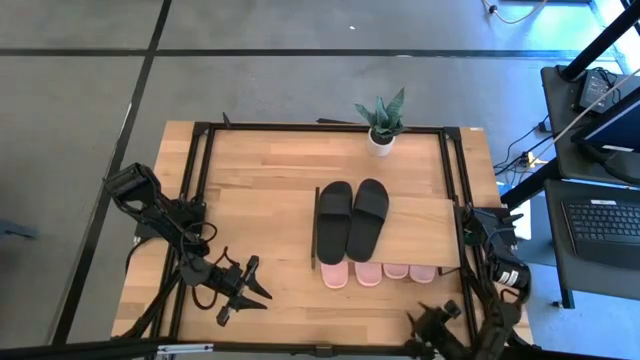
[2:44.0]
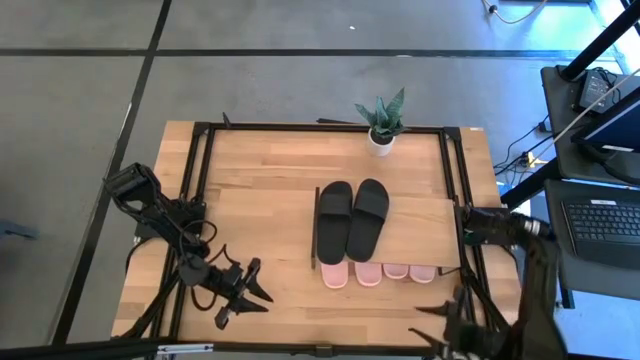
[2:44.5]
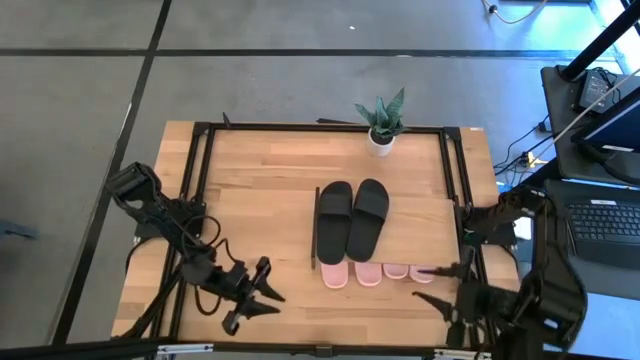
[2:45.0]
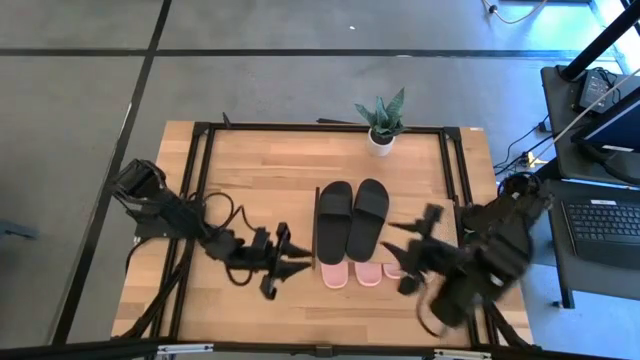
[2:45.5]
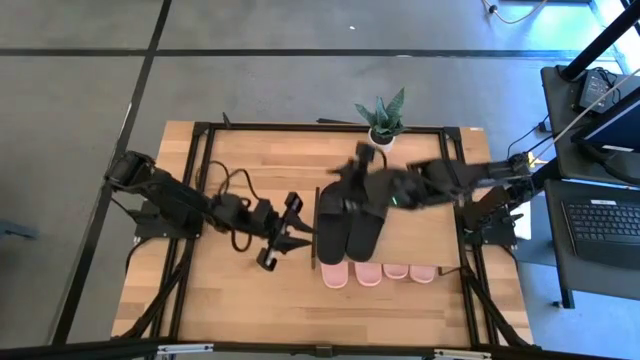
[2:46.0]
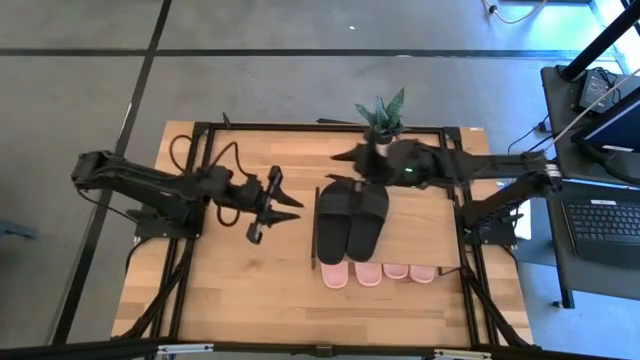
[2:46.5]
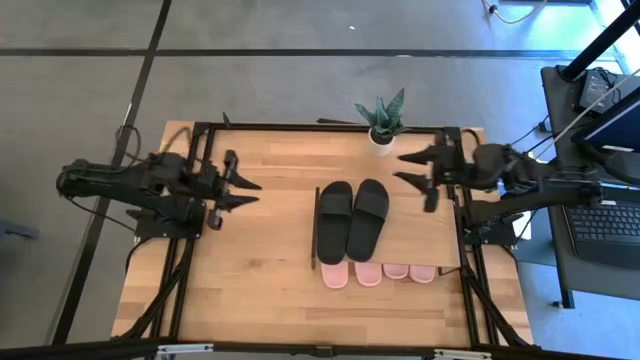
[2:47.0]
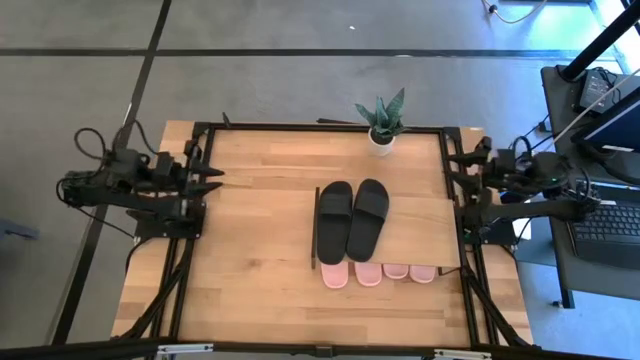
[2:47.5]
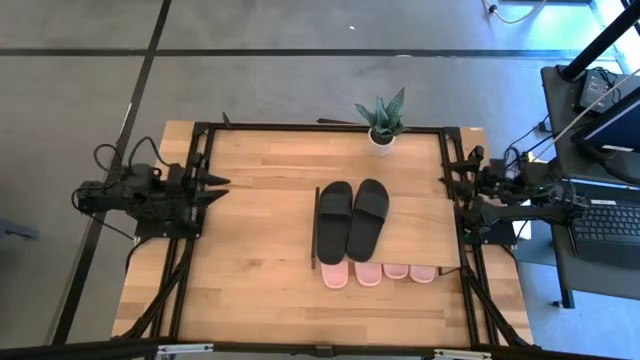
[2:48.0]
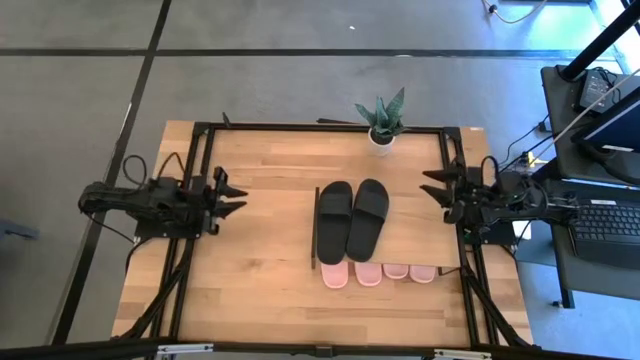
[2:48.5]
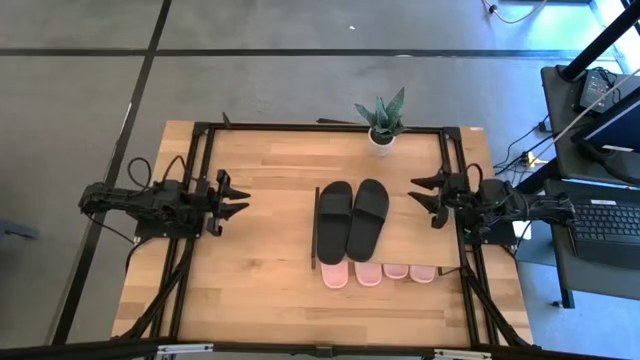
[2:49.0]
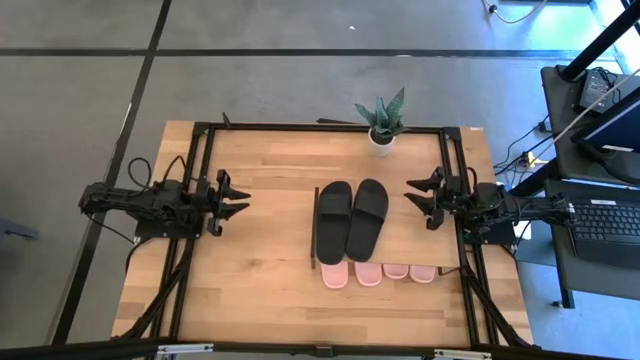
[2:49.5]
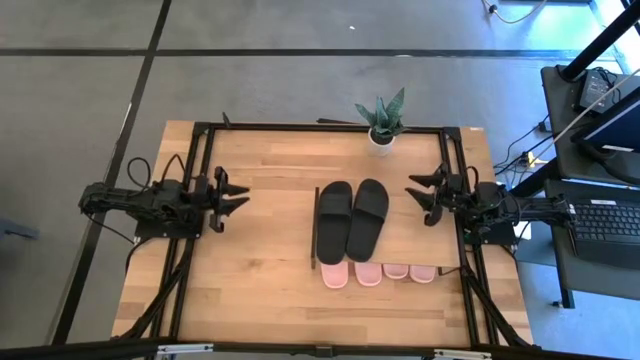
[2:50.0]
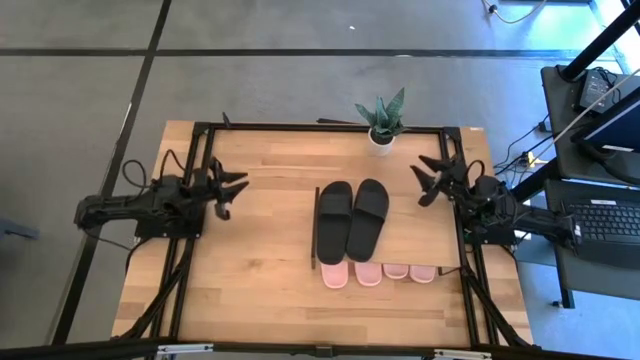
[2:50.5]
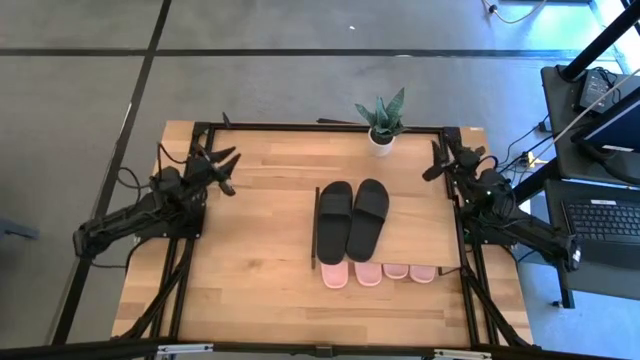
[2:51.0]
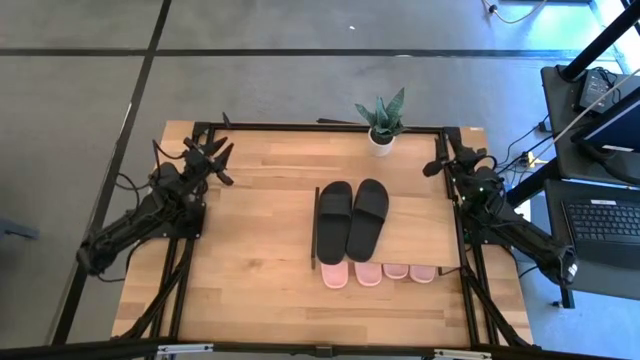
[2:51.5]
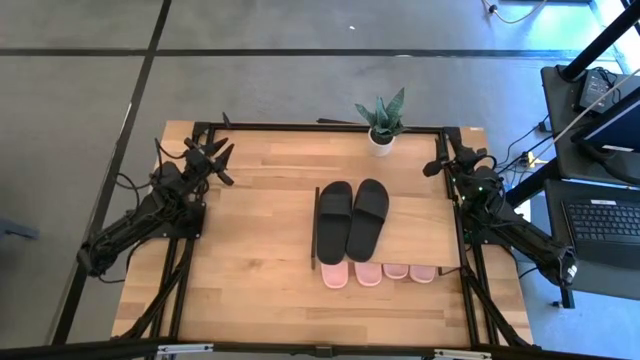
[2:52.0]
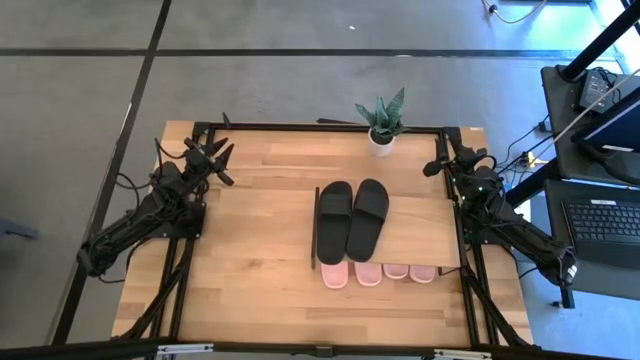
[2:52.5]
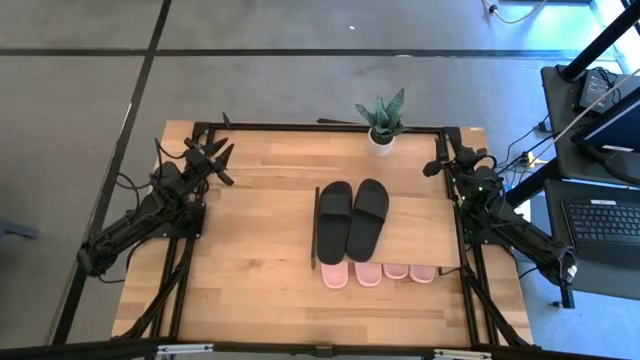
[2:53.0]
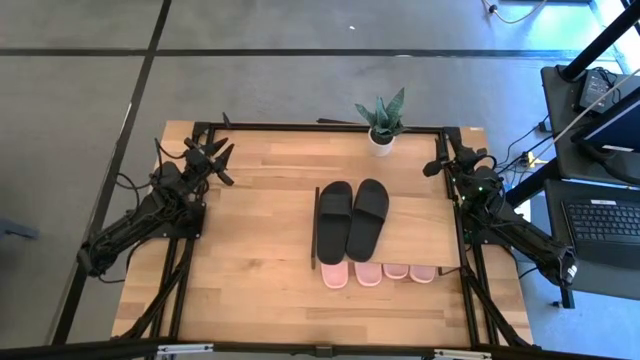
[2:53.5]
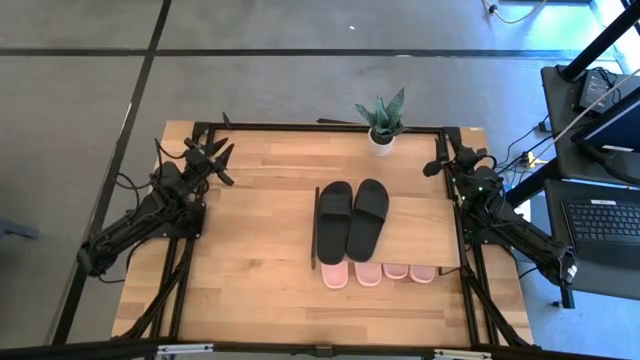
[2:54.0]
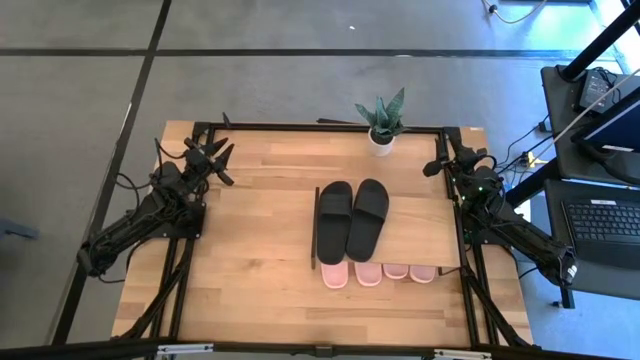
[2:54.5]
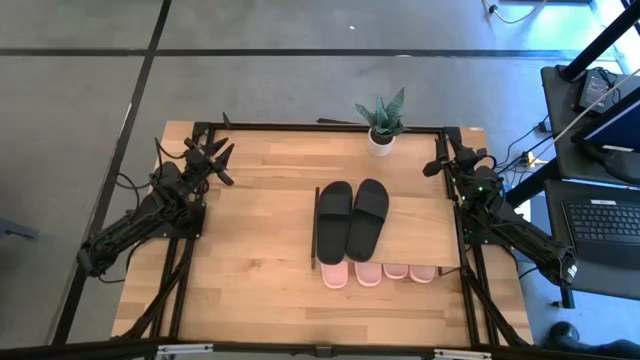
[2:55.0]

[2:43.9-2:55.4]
Task: Pick and place slides into the shelf
Return to Home Position

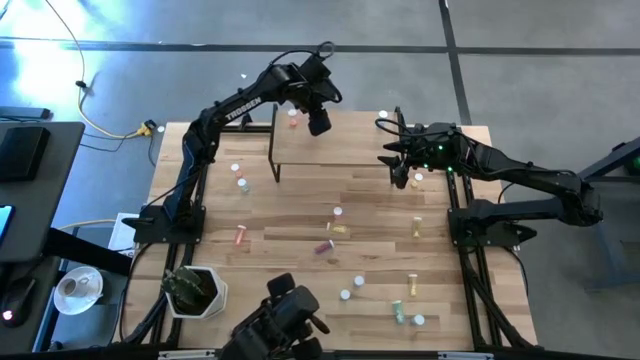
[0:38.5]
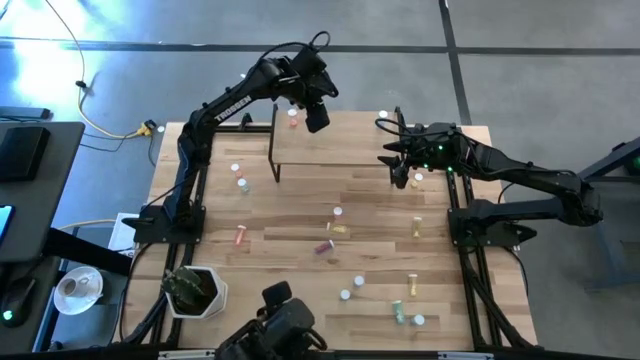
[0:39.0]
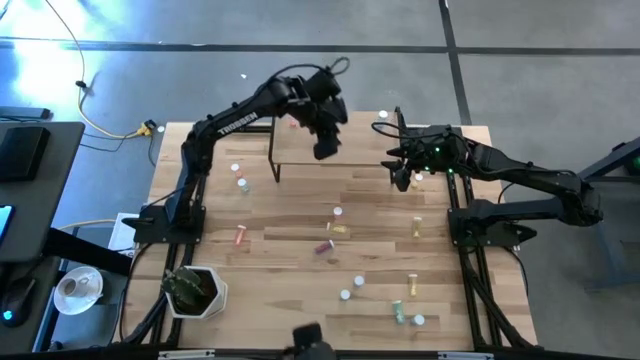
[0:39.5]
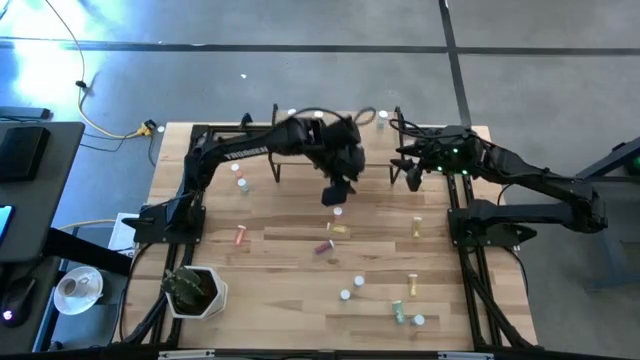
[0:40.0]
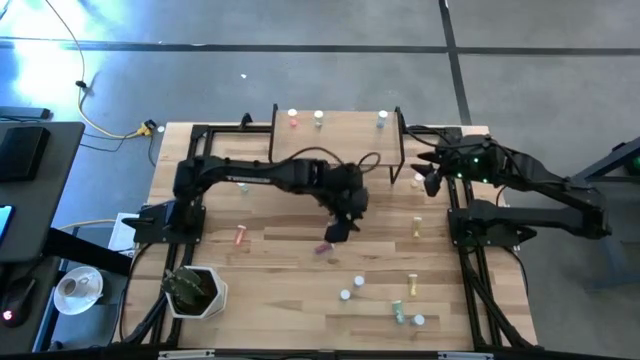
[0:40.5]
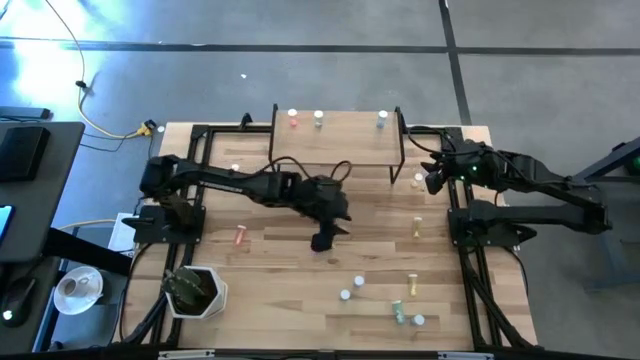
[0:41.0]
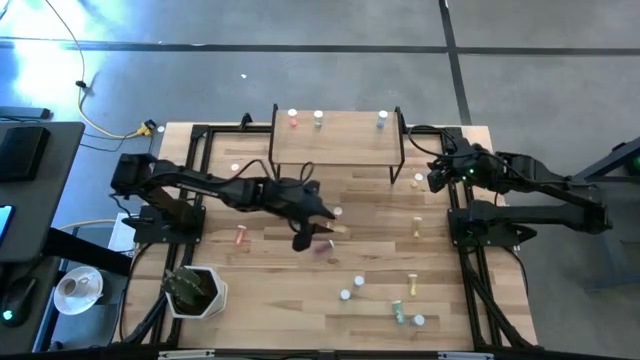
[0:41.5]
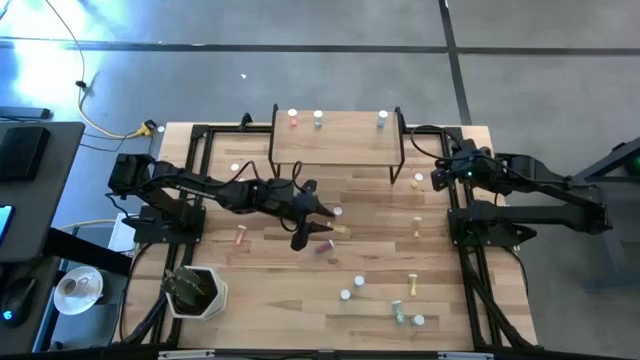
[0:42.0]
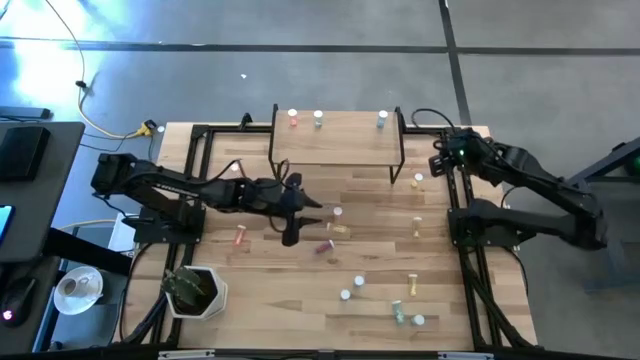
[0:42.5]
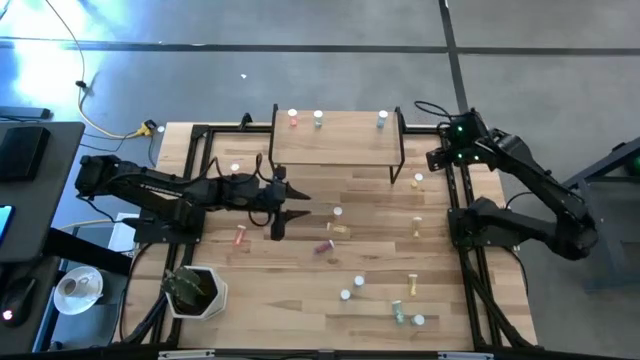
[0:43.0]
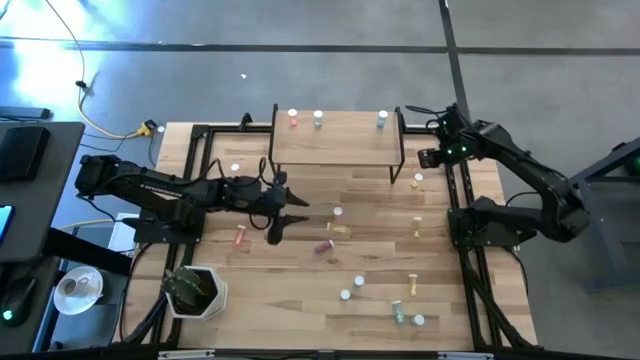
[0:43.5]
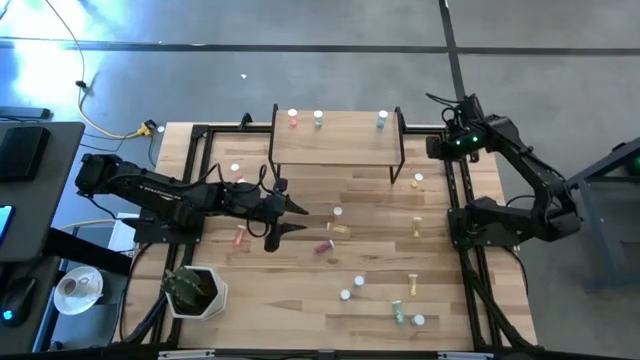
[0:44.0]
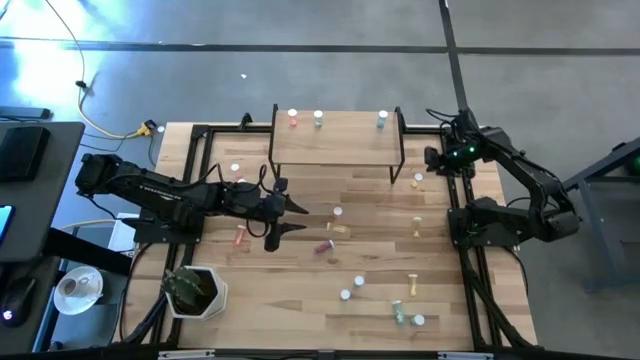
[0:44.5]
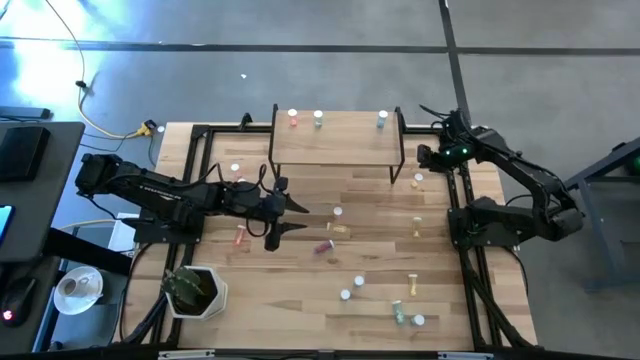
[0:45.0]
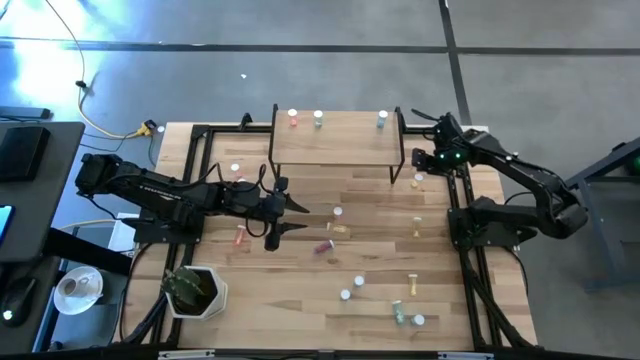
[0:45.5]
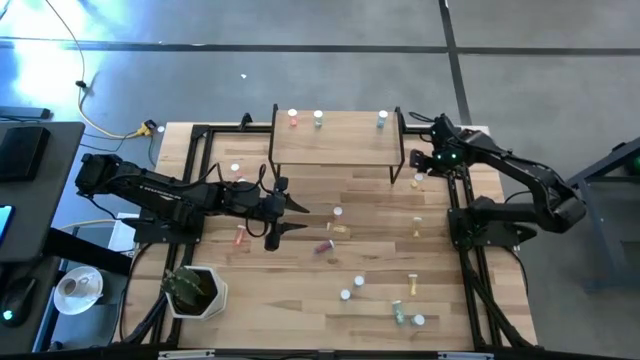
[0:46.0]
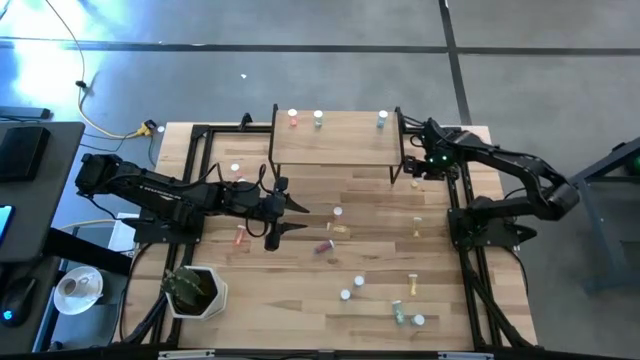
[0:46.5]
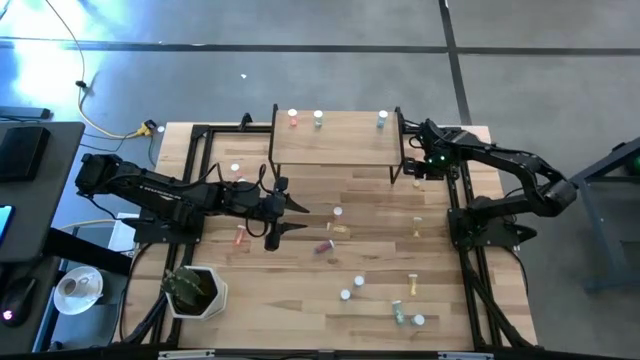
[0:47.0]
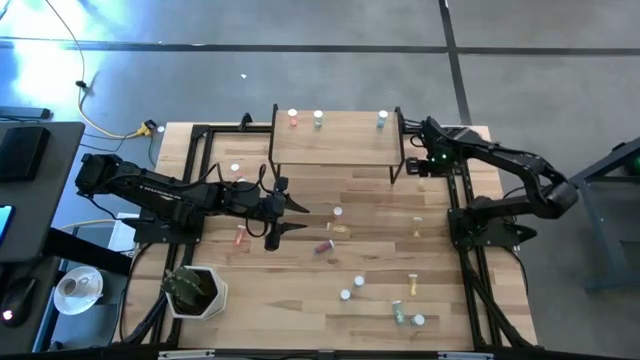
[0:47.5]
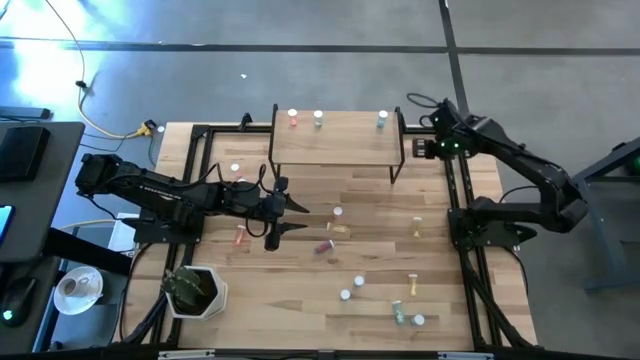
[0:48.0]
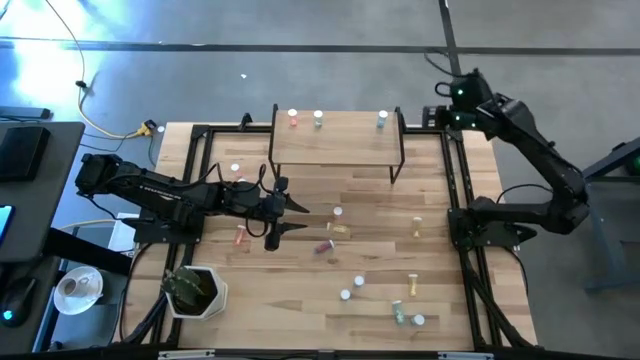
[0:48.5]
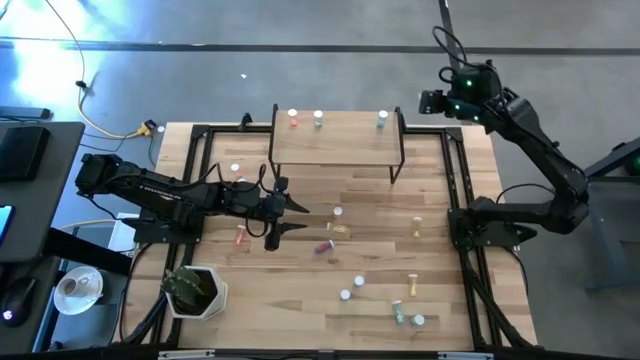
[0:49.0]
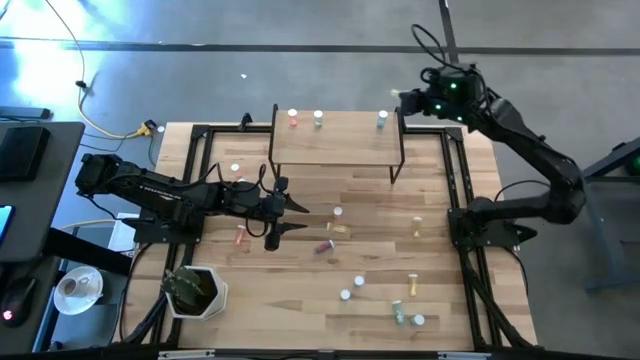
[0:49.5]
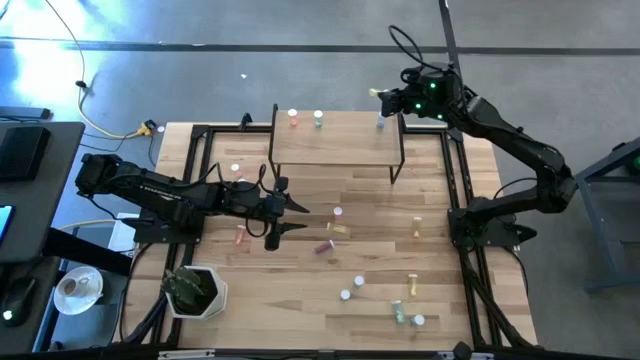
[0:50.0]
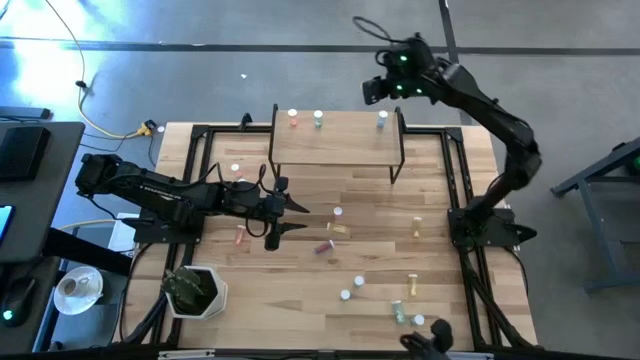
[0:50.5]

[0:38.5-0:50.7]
Task: Pick and place medicine bottles onto shelf by color
Put the yellow medicine bottle on the shelf
